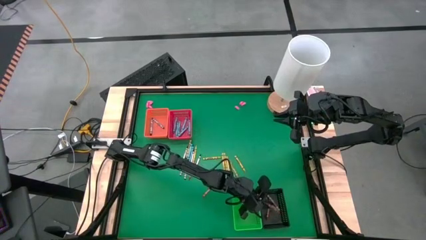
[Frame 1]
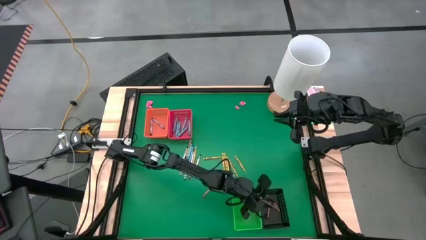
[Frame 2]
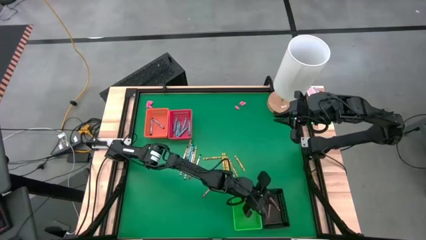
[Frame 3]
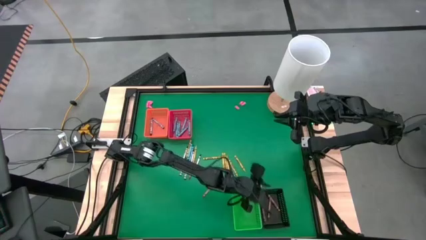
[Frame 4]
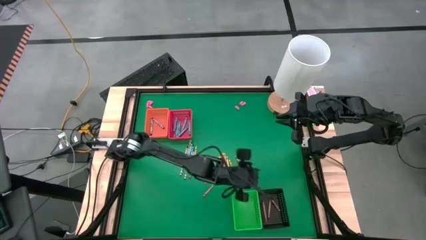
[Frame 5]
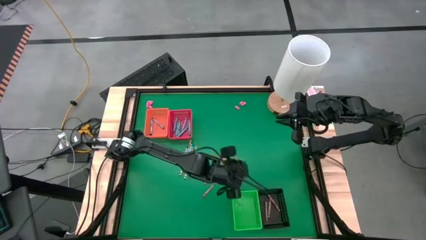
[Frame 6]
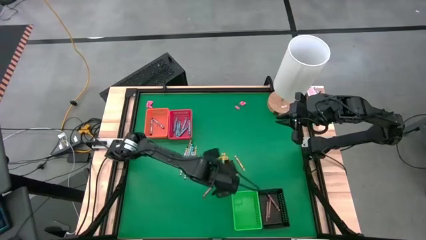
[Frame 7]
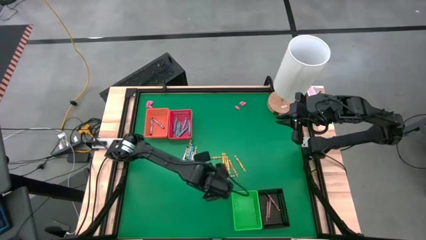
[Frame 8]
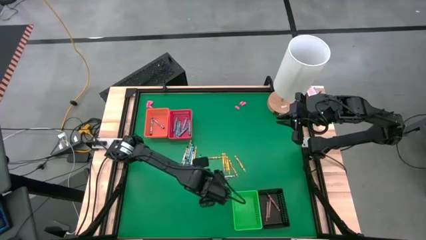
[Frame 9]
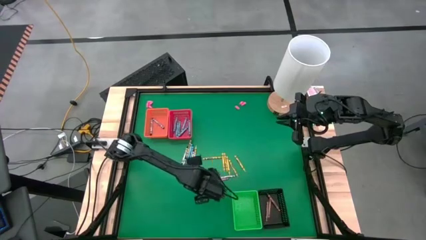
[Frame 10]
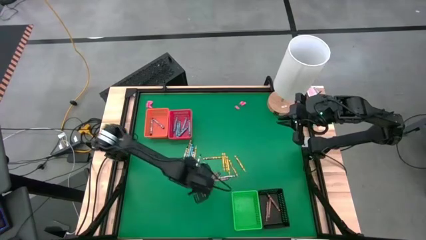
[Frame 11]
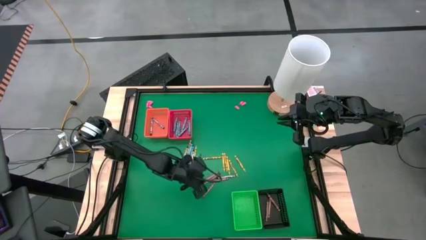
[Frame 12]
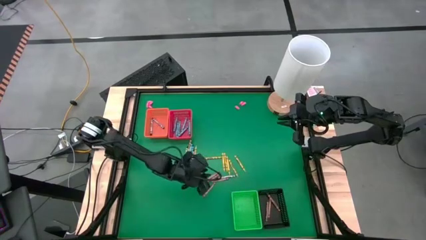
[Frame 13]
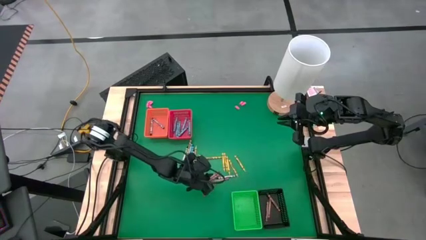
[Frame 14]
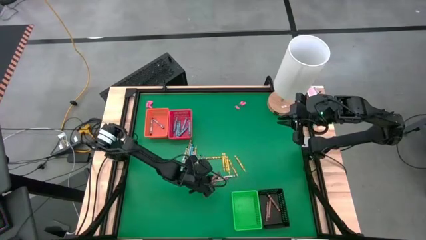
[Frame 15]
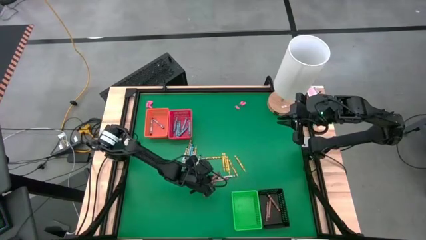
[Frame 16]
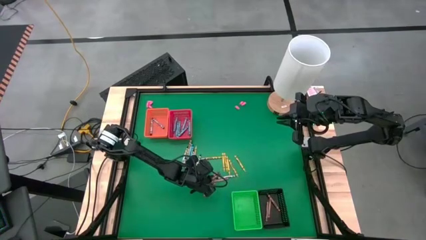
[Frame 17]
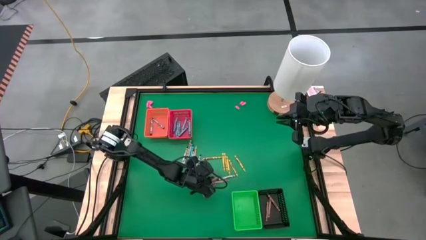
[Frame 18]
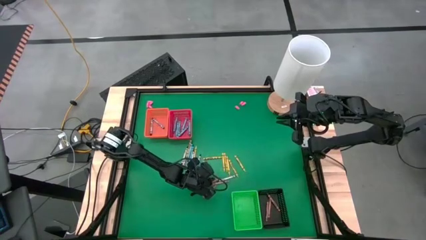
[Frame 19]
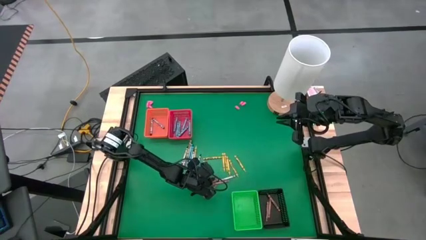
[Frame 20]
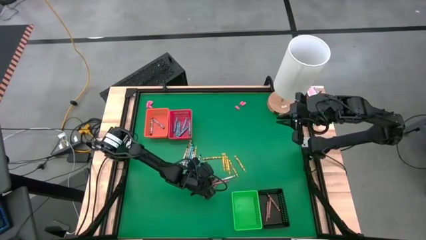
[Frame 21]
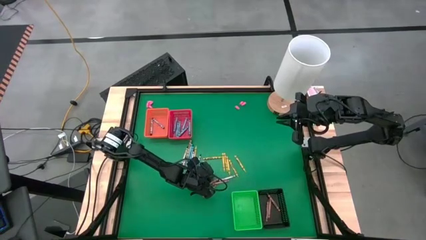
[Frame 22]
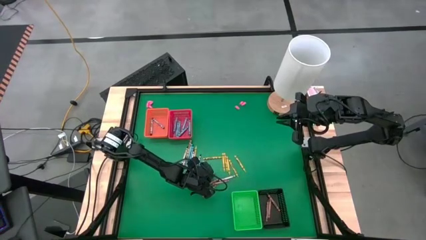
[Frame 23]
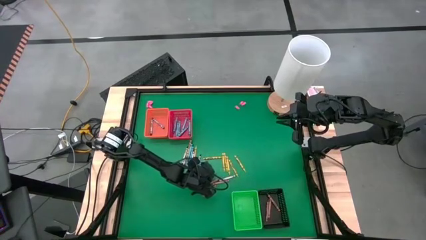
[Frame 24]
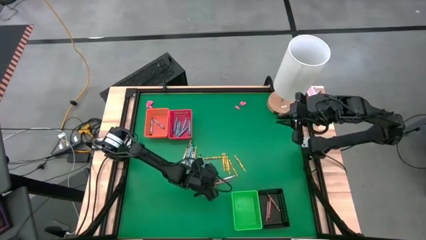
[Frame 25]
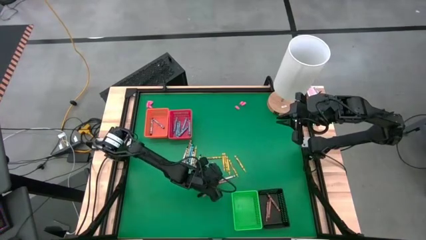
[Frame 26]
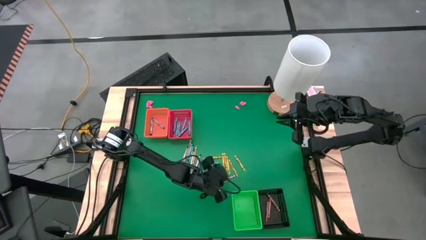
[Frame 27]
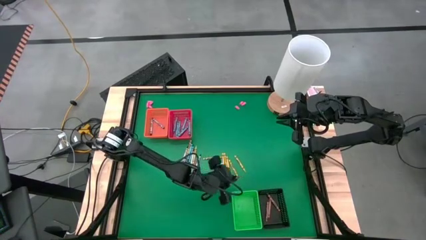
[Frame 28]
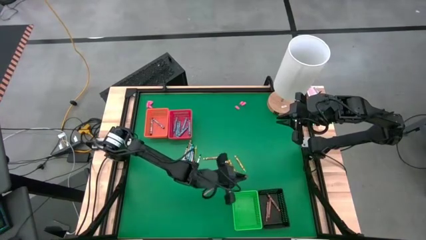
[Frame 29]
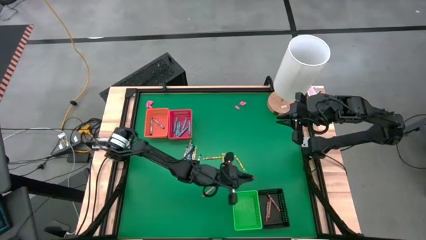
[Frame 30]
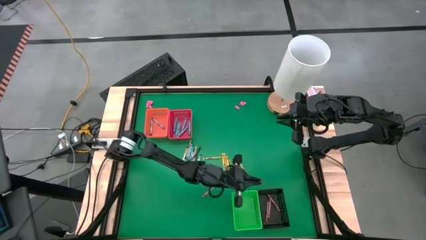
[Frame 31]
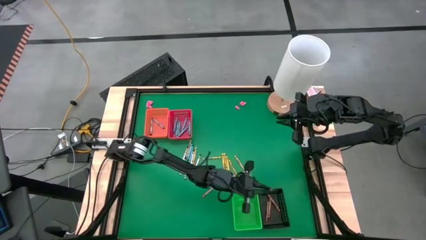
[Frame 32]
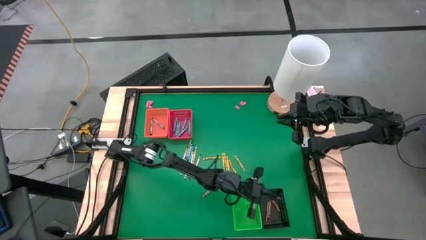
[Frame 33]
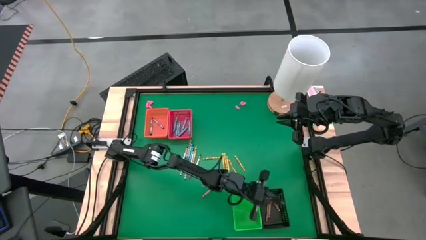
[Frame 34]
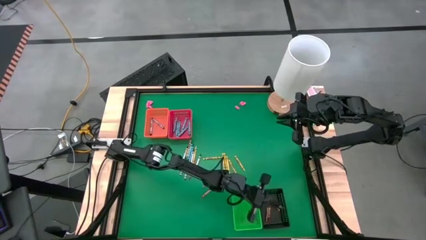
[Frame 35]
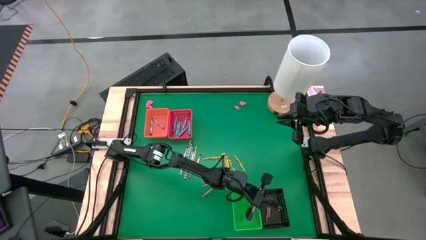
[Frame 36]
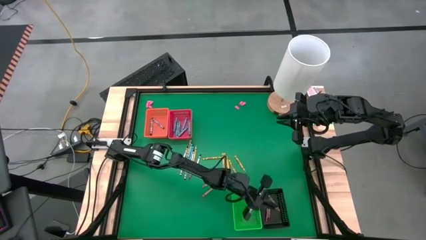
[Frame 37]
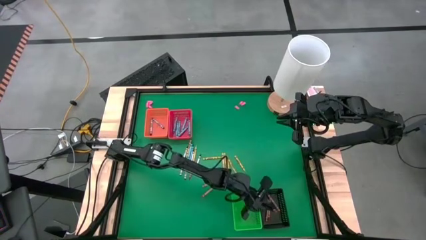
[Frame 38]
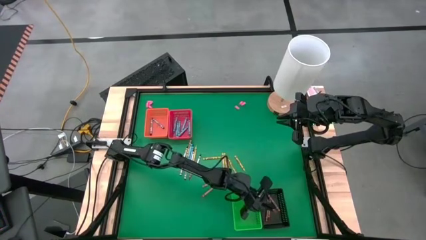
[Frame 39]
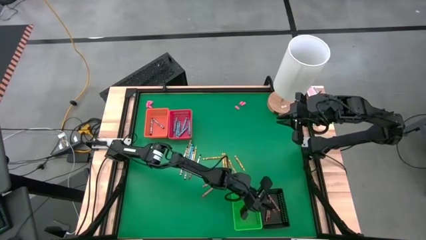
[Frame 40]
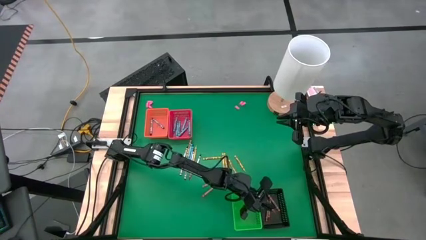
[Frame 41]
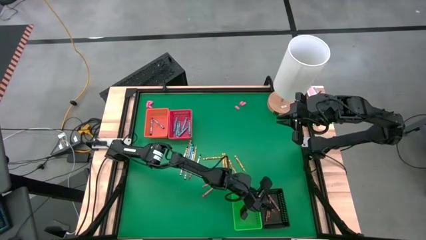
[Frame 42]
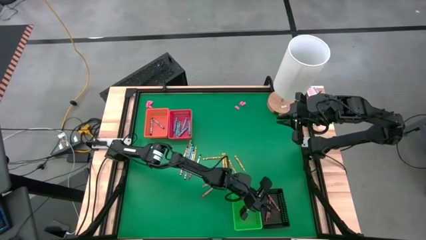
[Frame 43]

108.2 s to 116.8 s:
Task: Sort crayons
Put the brown crayon into the black bin

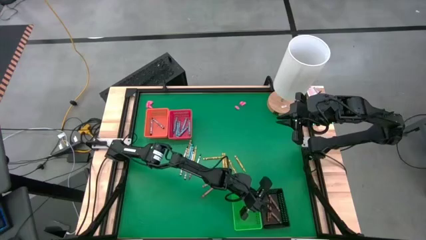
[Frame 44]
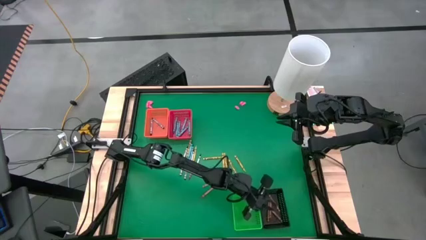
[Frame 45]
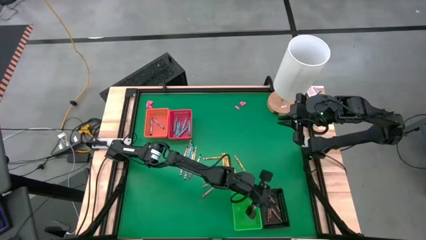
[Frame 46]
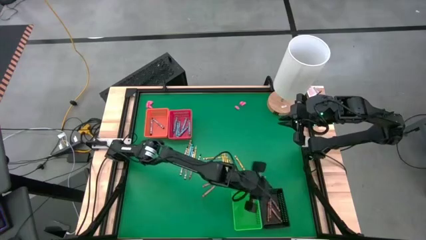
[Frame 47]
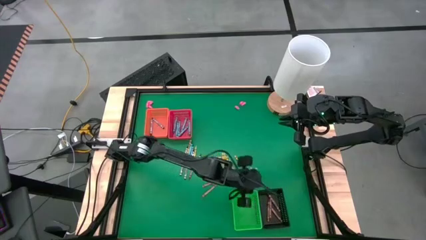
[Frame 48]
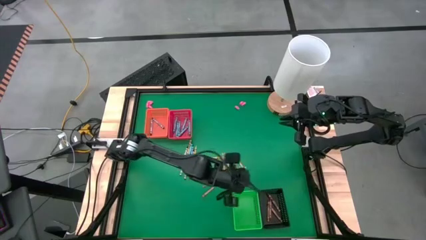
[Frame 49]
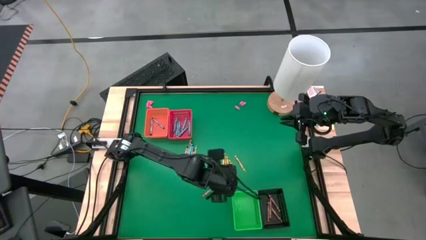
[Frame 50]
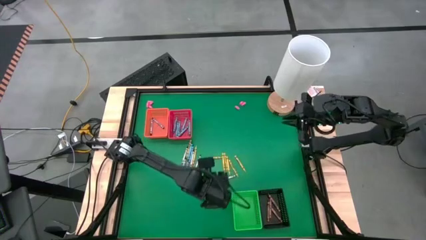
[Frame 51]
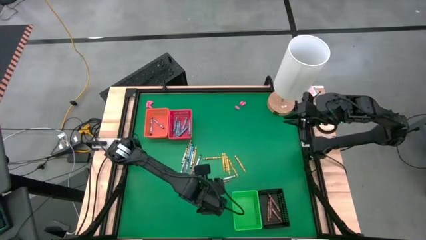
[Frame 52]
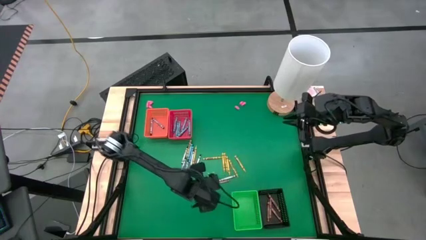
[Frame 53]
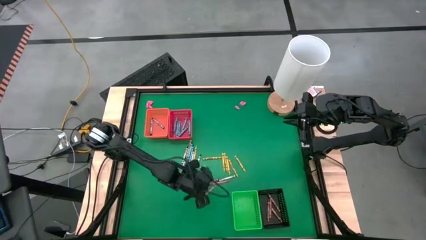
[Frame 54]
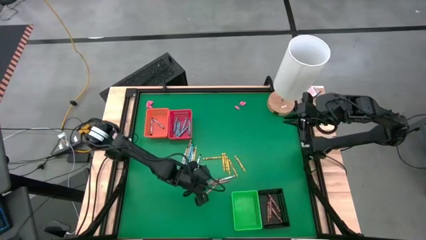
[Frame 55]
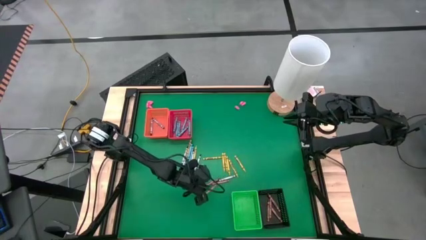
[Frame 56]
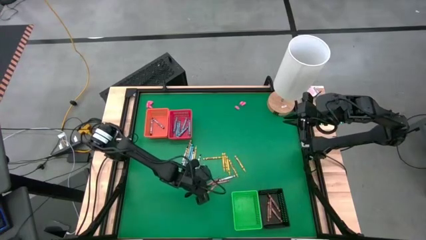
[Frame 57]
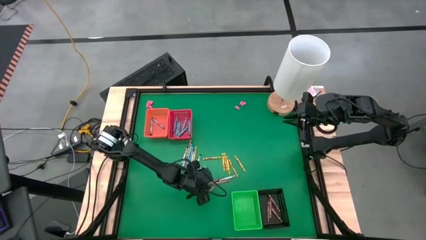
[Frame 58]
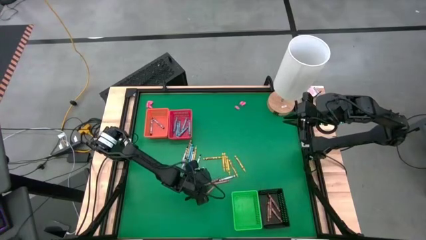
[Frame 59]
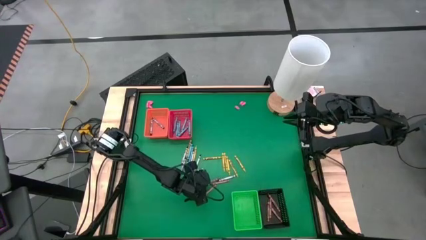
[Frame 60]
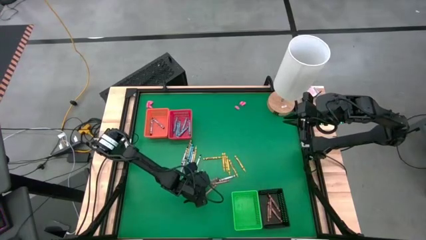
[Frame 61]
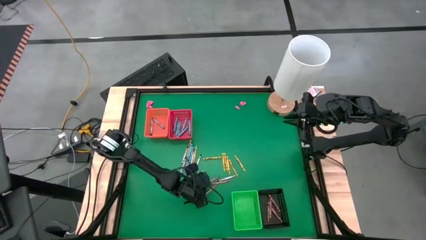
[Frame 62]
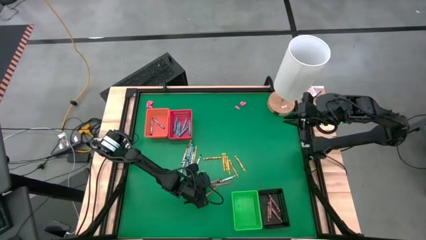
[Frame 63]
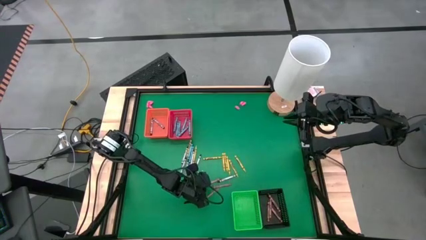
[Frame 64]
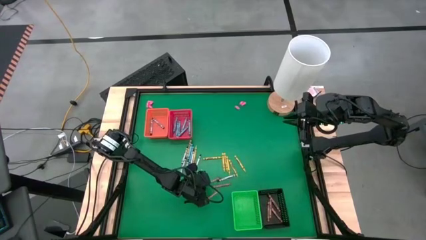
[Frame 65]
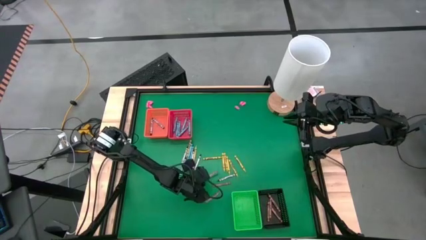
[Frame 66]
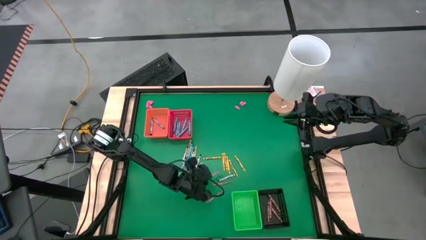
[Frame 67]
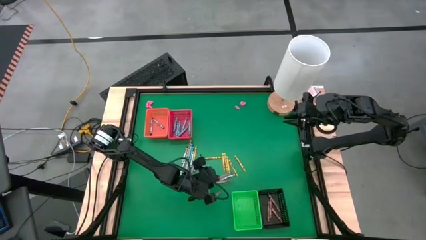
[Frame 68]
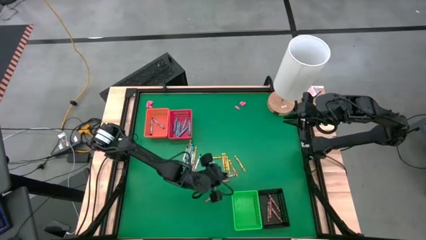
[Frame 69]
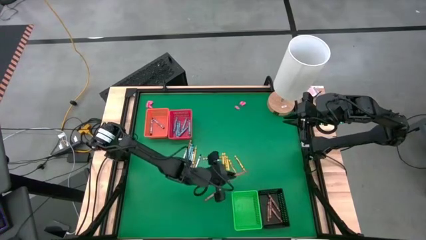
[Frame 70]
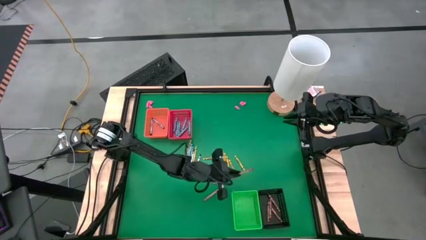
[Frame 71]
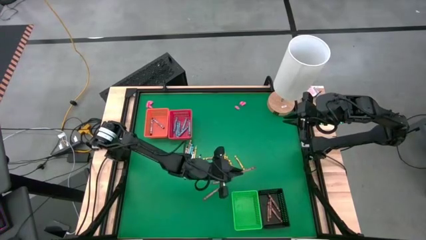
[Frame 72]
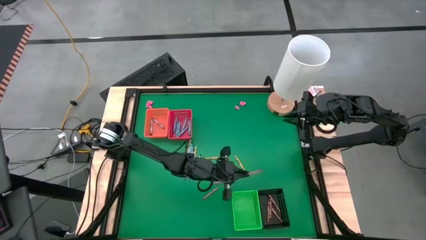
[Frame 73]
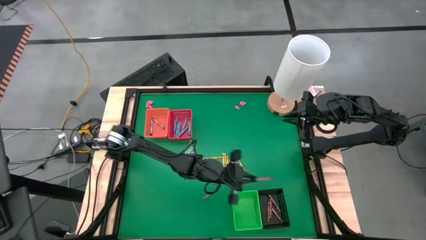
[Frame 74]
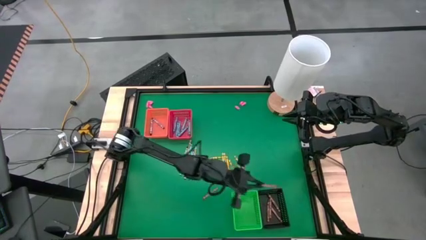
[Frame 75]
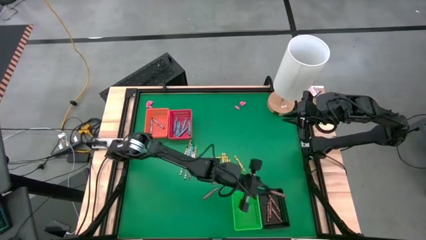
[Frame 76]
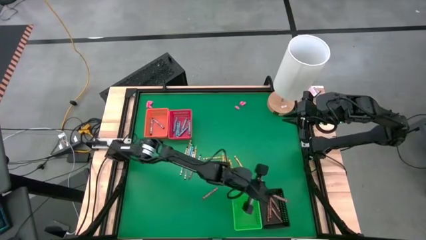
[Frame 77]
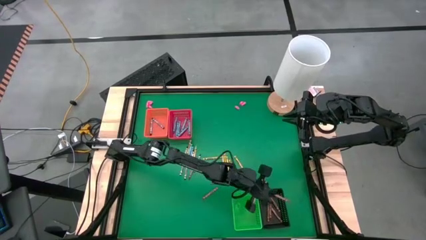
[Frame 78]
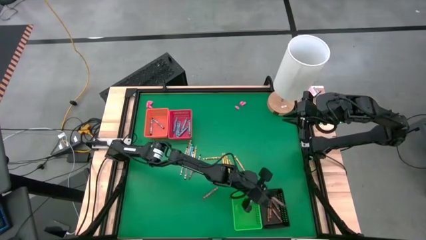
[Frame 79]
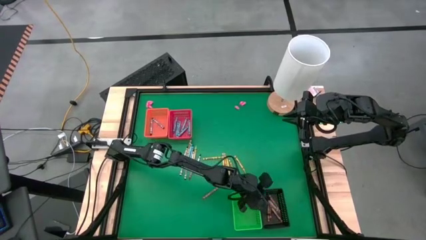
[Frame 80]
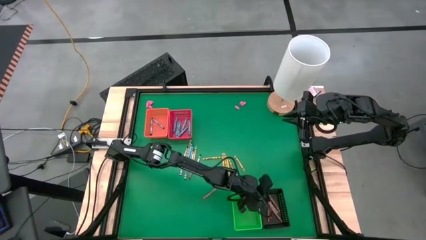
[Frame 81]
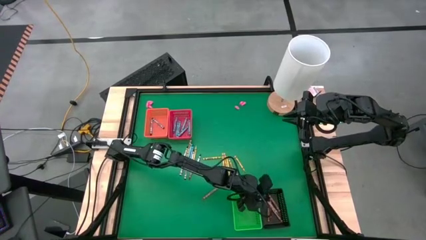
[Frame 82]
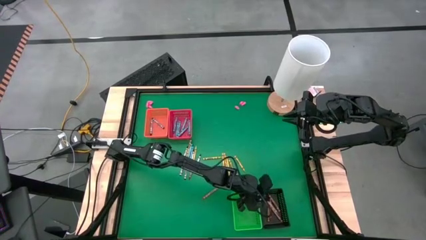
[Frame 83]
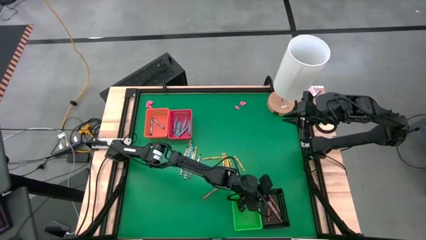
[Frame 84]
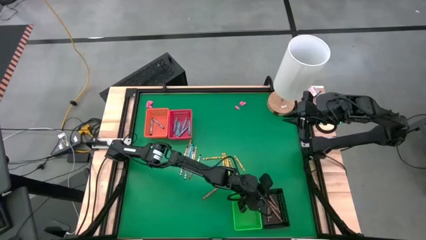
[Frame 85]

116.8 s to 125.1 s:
Put the brown crayon into the black bin
